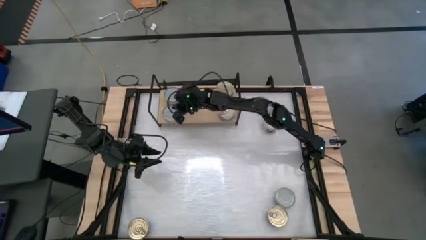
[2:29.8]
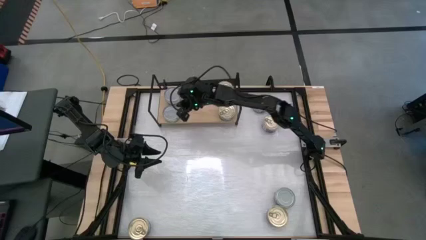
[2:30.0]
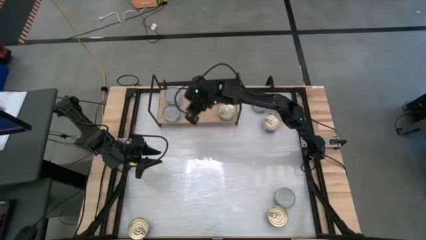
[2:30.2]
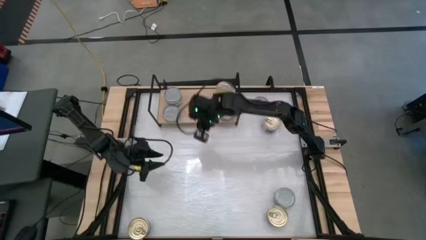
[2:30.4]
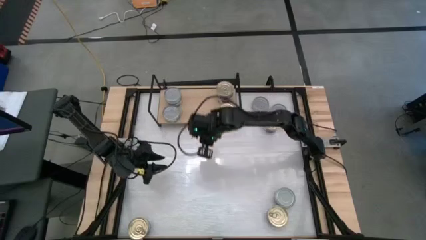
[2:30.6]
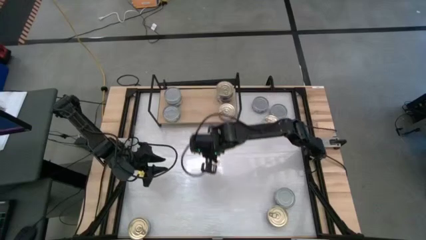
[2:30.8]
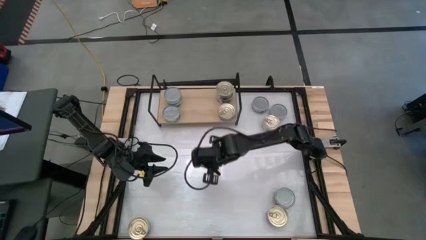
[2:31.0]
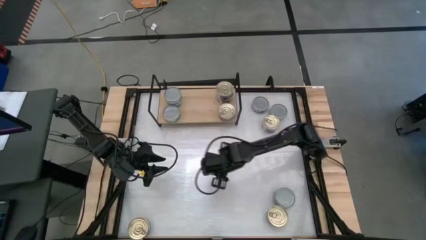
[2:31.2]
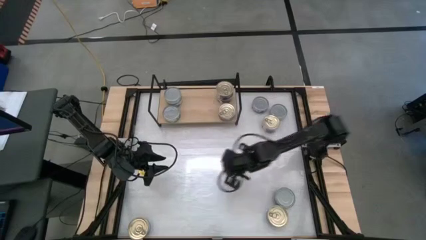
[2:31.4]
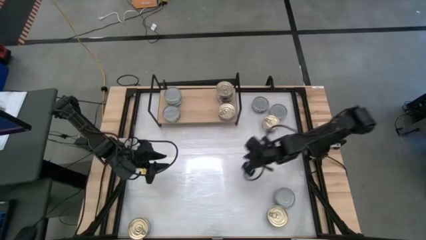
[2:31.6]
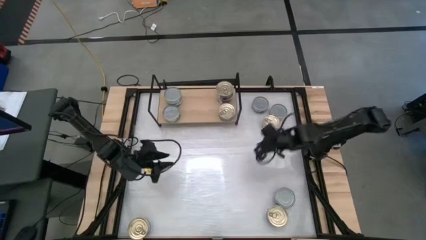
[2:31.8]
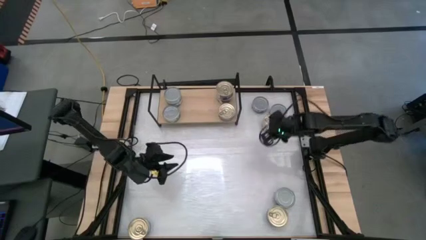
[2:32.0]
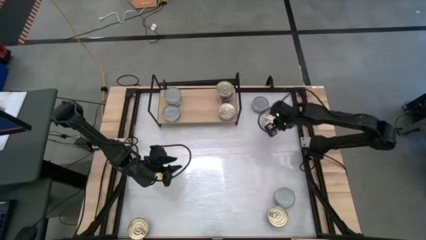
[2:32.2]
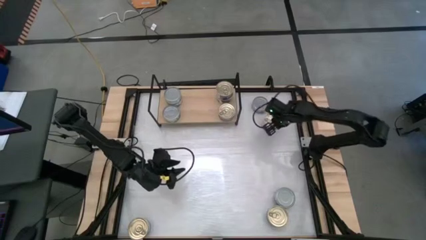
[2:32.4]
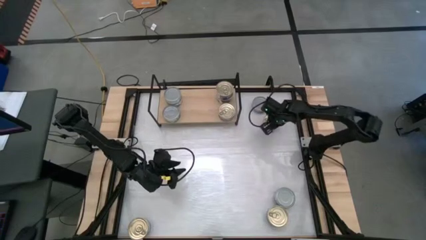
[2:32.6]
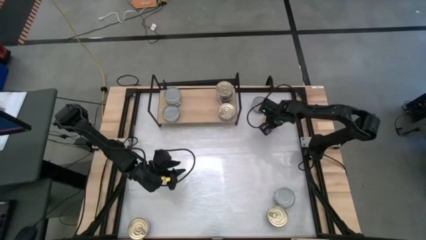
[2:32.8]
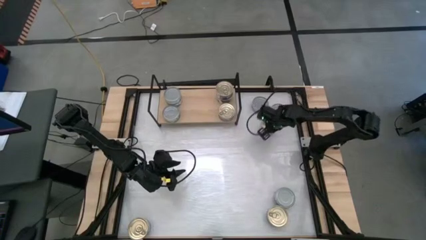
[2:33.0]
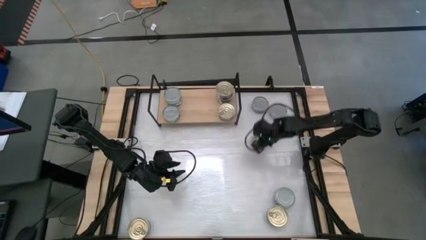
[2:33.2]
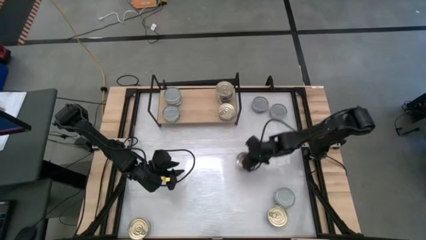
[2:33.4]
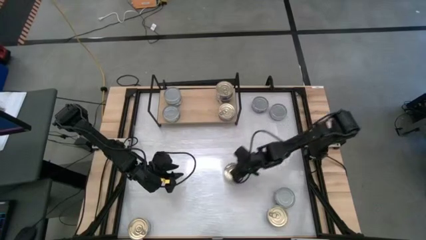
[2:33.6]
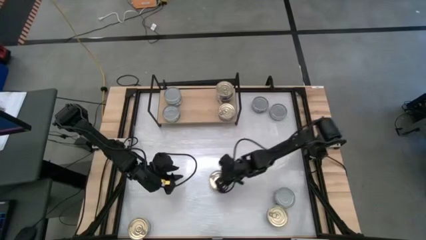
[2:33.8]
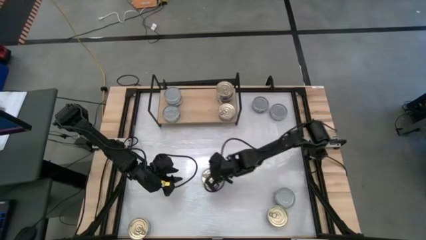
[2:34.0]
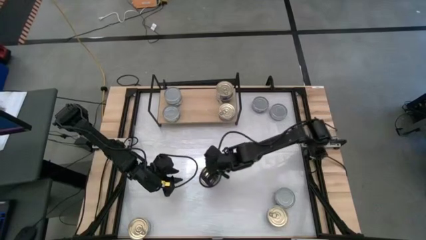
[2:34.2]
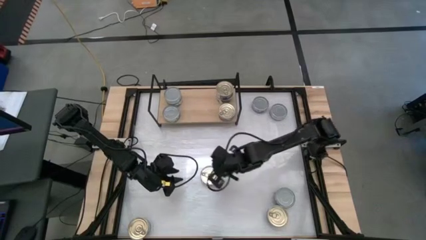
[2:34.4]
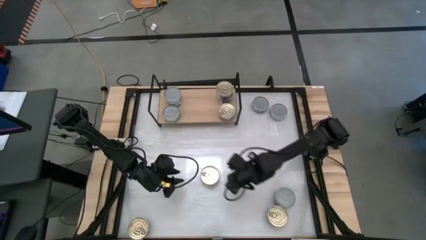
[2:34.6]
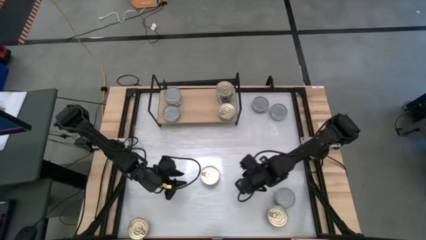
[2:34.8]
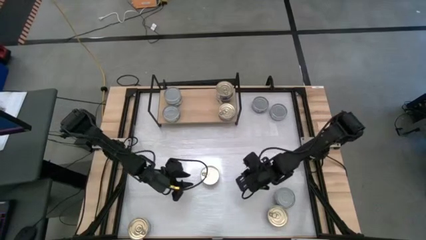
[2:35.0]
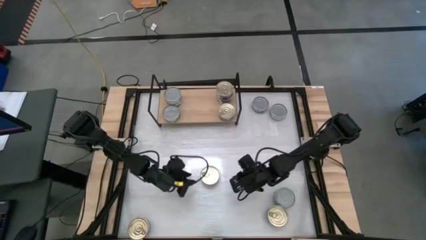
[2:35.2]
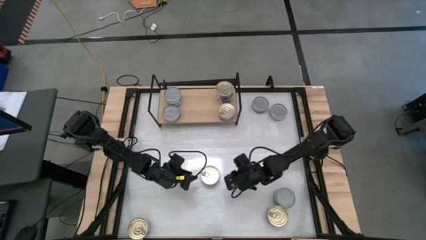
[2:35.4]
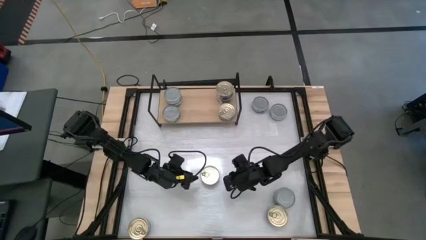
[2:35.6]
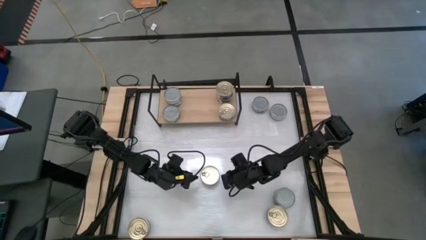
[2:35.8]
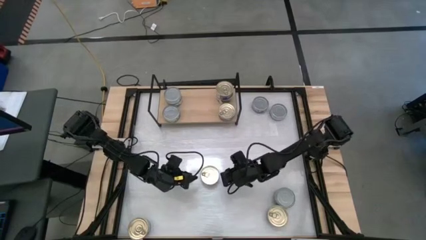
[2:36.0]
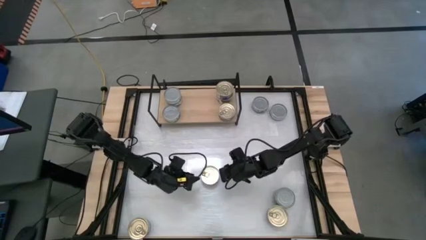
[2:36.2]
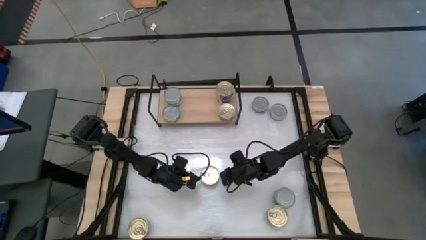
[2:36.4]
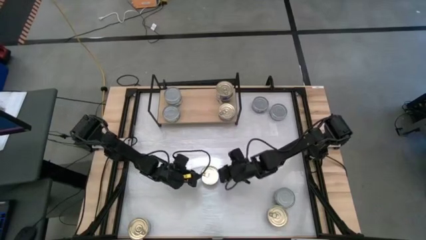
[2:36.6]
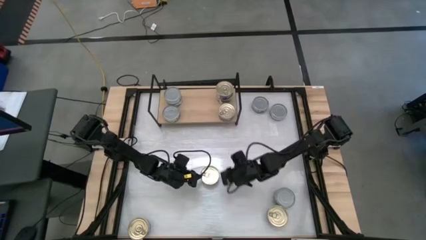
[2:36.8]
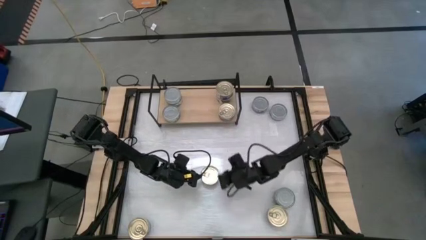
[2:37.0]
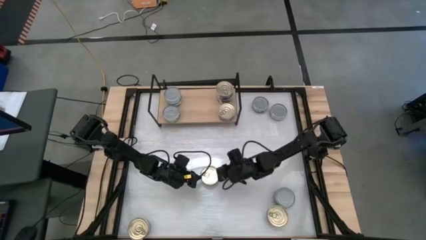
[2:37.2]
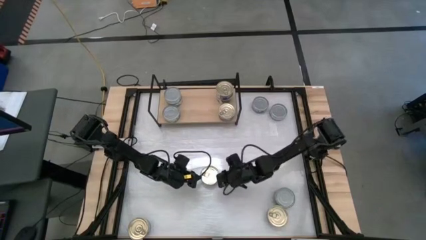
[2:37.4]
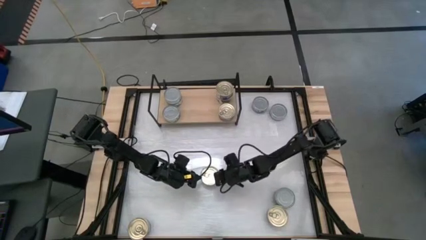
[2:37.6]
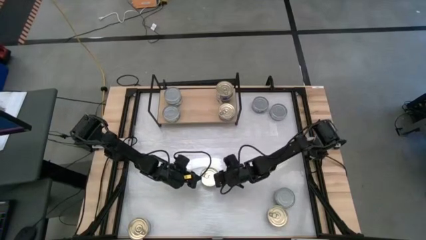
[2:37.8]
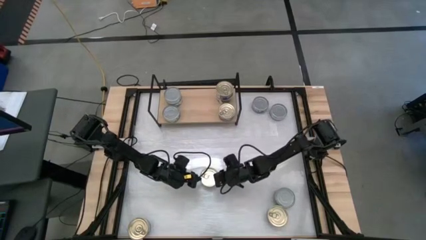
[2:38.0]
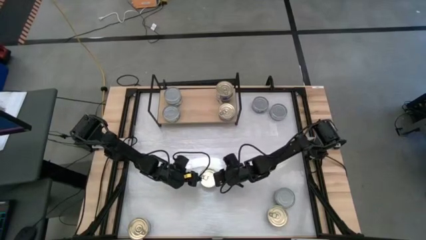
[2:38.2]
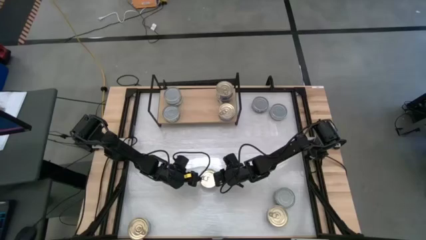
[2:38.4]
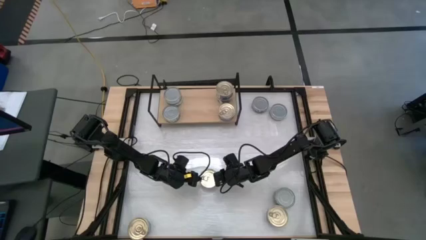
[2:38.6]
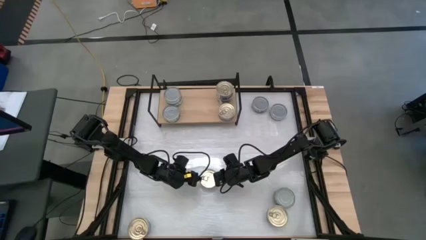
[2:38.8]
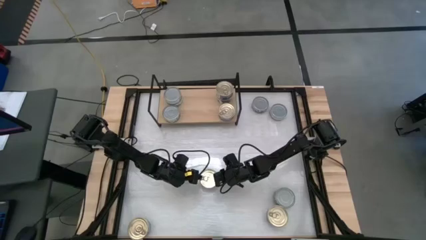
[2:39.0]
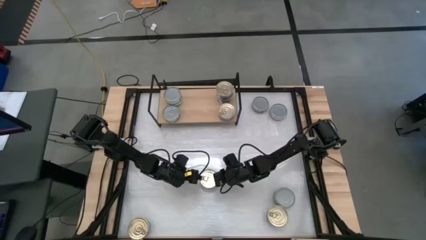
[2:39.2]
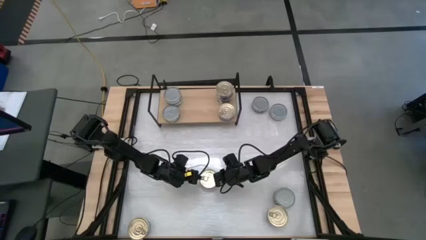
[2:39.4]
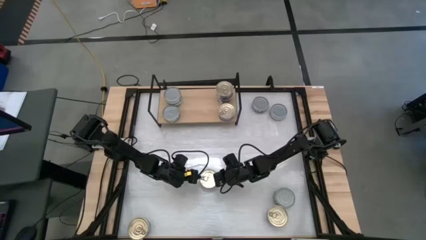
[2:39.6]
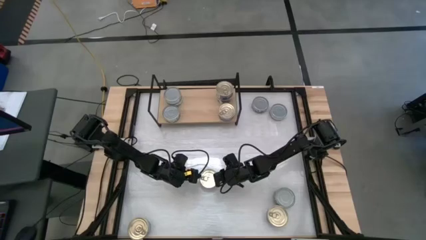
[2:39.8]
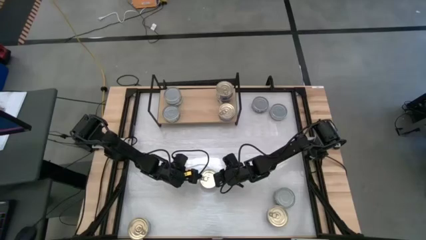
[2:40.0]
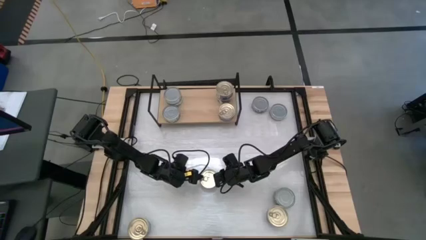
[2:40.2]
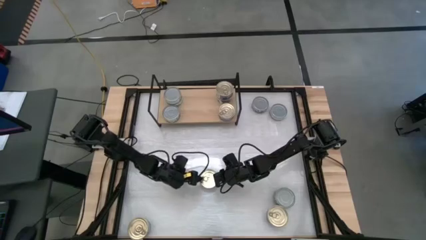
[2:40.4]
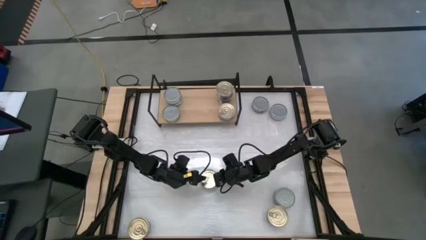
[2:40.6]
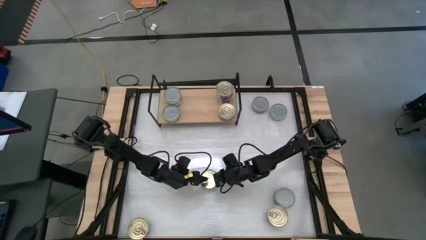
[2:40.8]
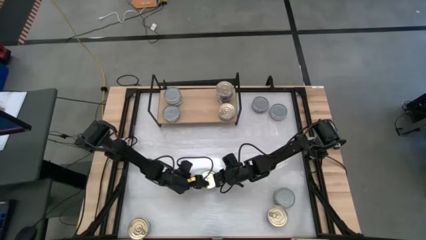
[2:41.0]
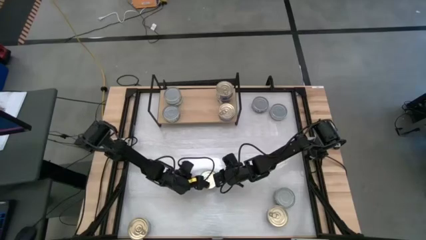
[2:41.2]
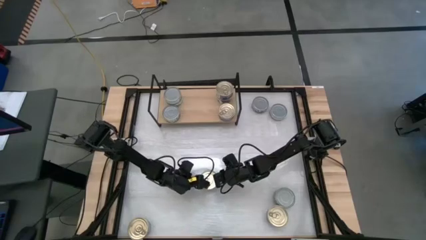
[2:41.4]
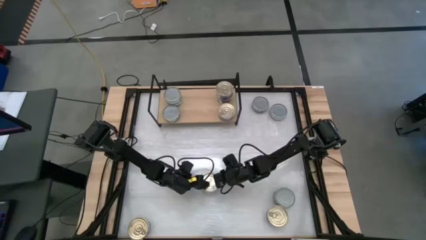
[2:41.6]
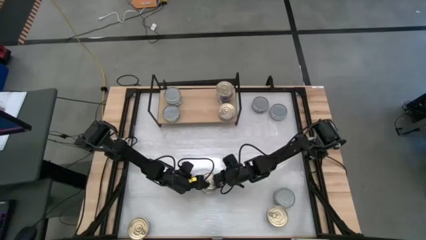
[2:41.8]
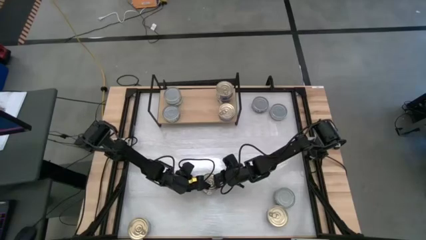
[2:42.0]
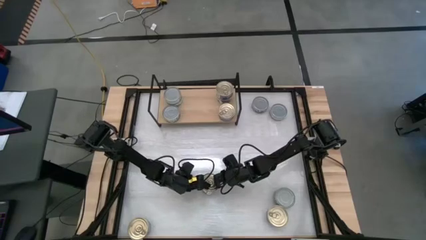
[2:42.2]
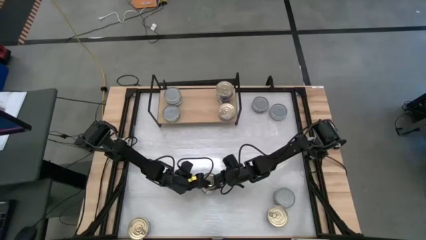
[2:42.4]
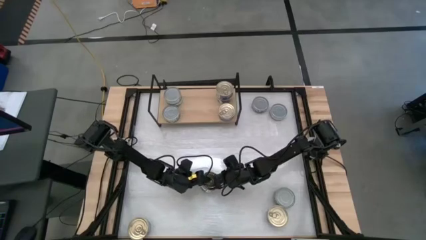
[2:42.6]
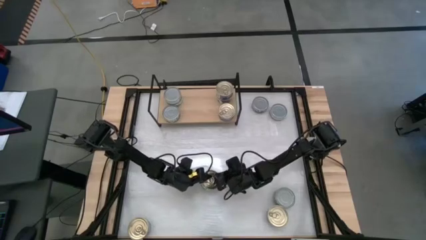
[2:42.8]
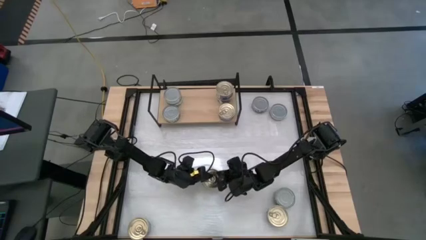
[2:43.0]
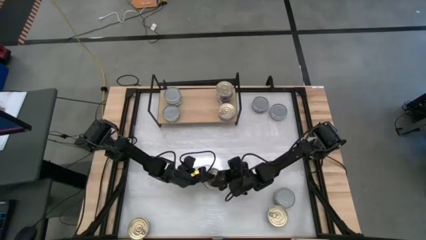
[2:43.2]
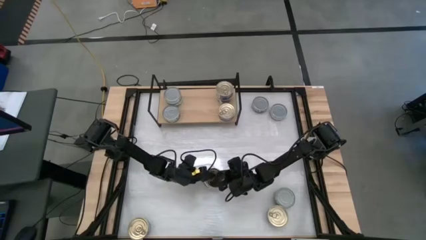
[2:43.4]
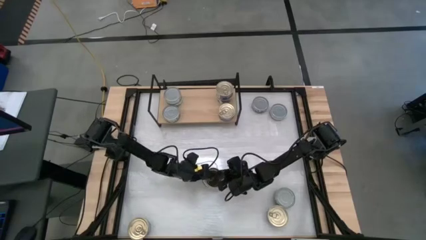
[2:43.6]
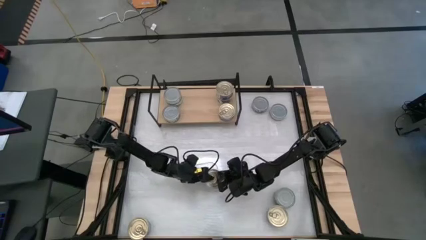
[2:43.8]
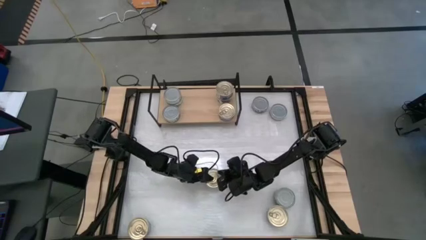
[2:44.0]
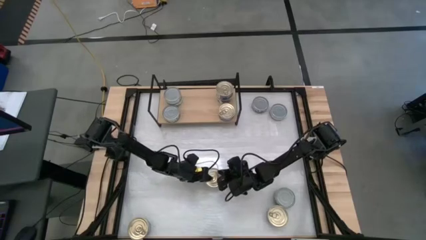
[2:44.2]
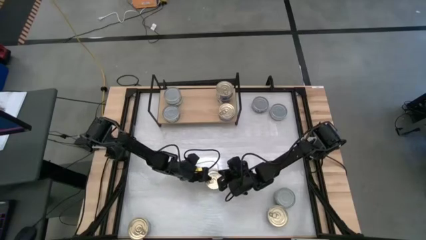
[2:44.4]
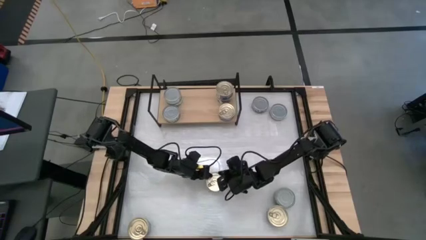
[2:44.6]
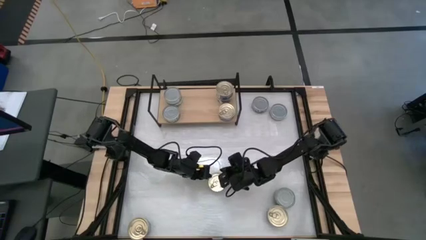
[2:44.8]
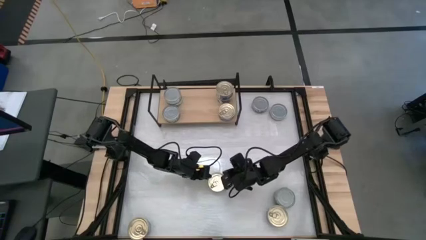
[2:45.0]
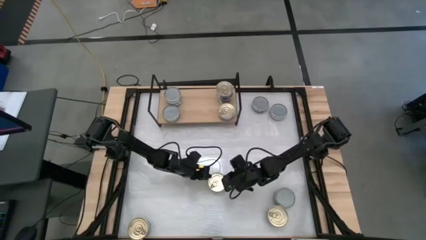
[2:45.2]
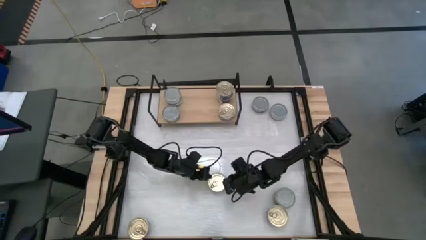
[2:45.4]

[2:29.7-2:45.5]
Task: Stack canned seafood by type on shelf
Stack the blue tuna can on top of the blue tuna can on the shelf

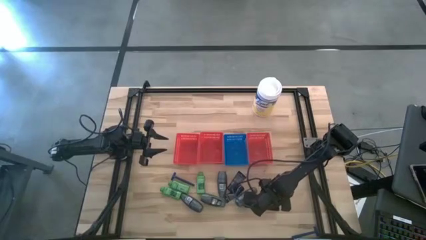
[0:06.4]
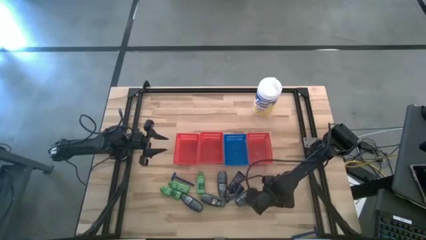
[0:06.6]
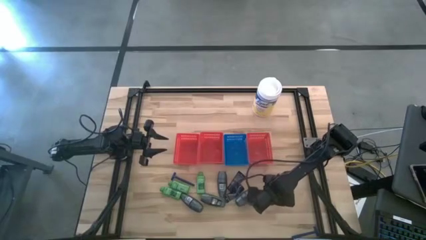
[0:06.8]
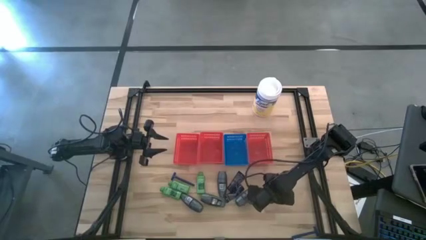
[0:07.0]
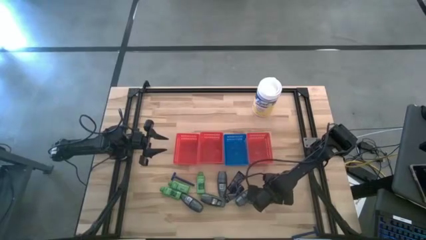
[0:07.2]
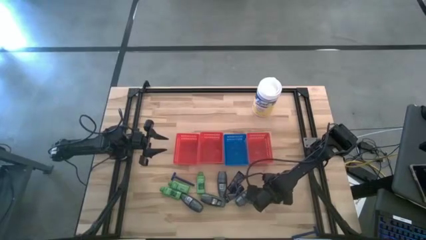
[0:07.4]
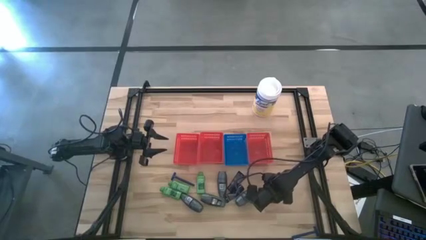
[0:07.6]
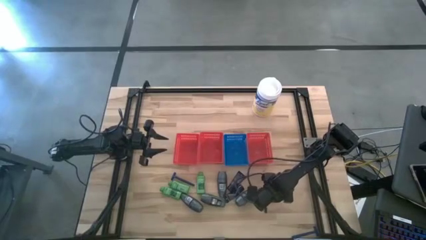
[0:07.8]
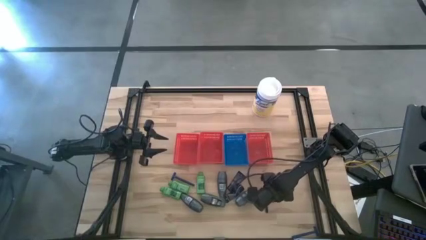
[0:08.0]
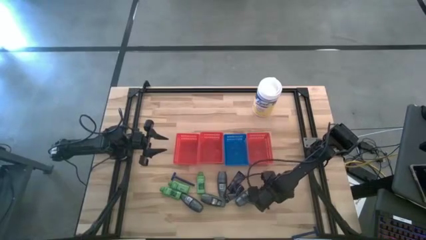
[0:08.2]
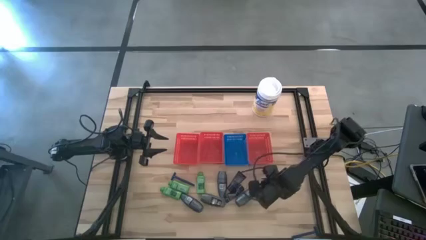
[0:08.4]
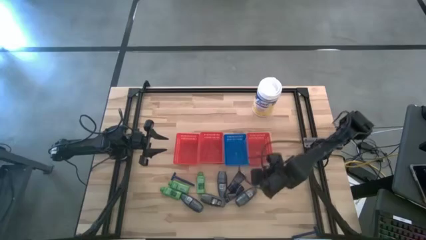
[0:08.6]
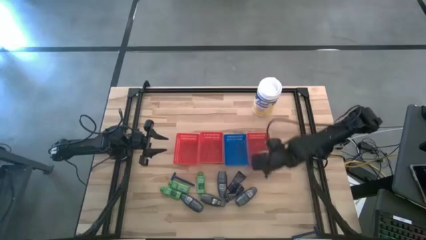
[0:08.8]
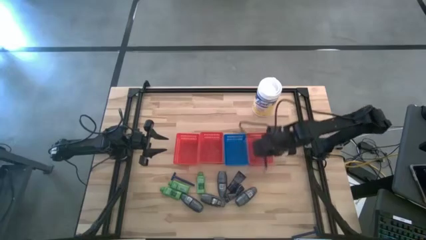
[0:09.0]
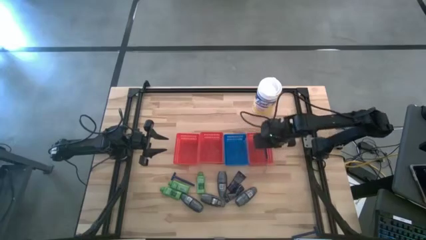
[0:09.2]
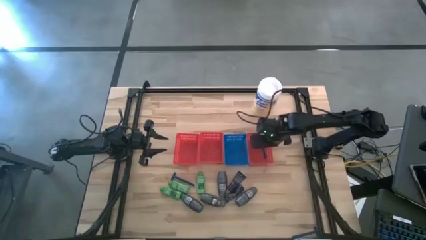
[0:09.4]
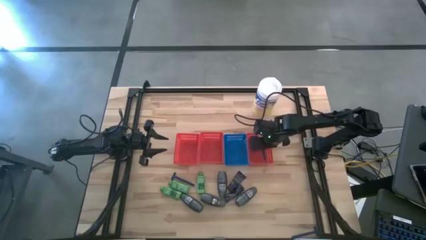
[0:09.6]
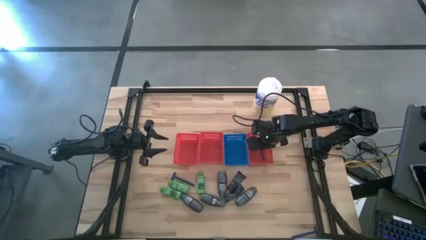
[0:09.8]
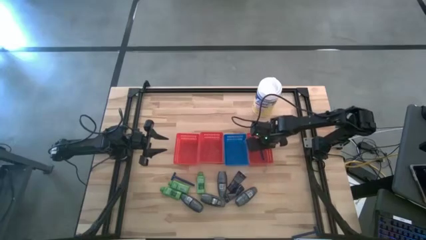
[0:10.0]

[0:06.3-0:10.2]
Task: Pick & Place Travel size toiletries
Put the razor into the right red bin
